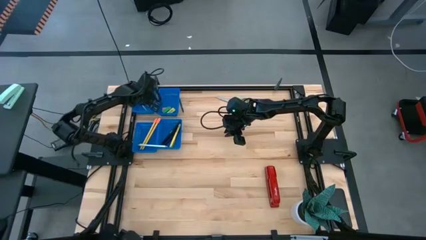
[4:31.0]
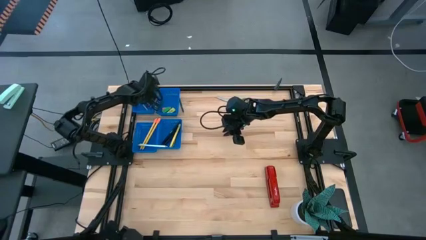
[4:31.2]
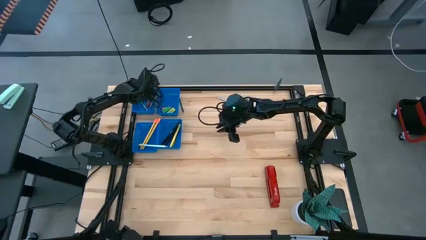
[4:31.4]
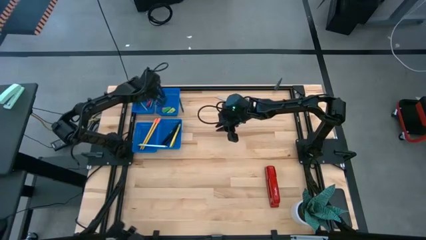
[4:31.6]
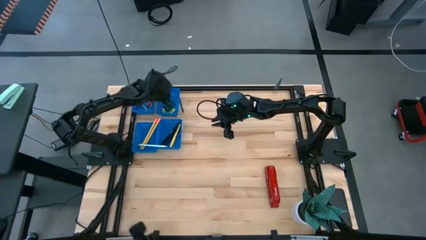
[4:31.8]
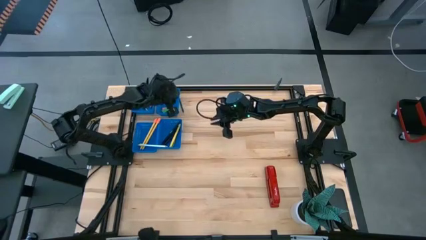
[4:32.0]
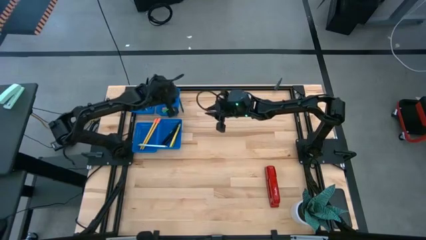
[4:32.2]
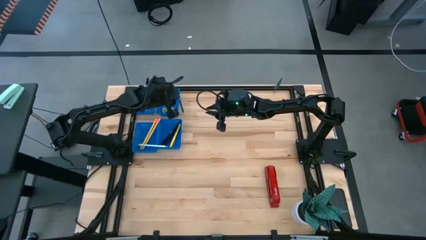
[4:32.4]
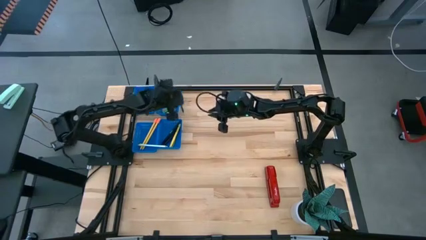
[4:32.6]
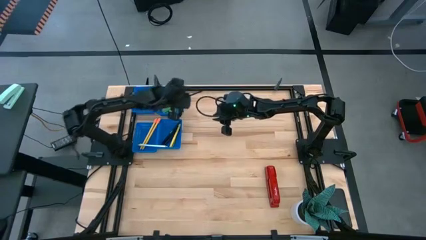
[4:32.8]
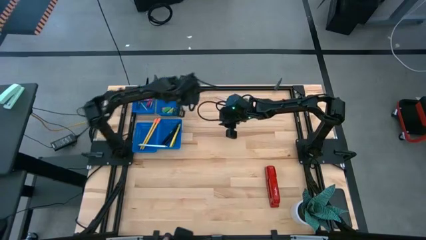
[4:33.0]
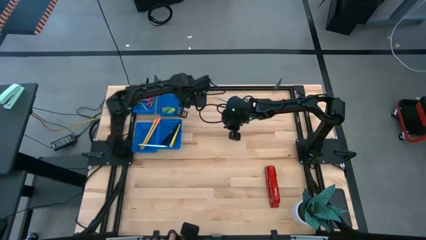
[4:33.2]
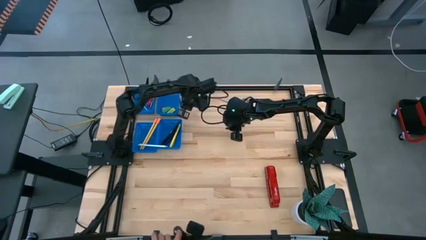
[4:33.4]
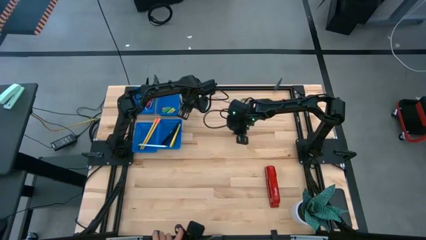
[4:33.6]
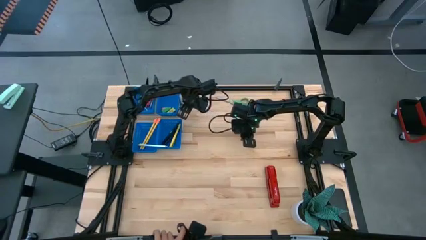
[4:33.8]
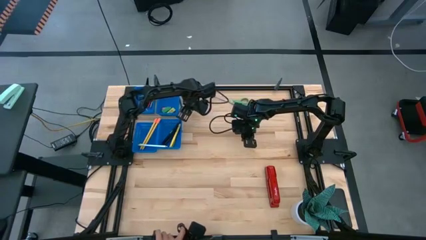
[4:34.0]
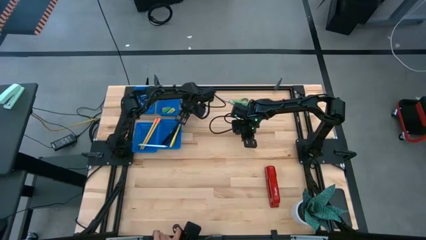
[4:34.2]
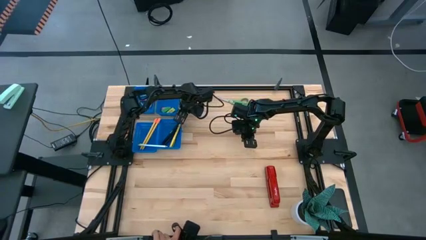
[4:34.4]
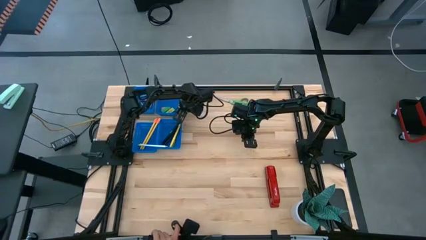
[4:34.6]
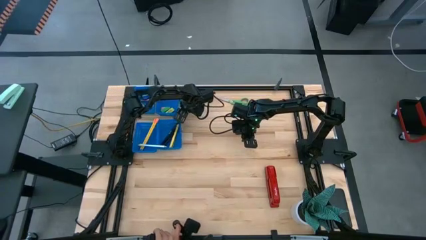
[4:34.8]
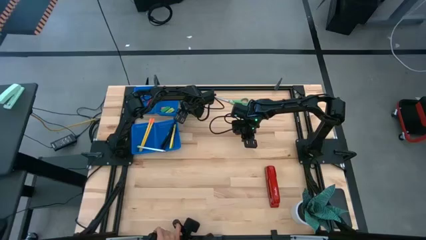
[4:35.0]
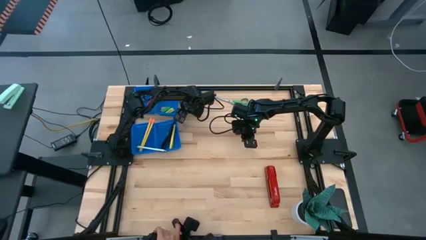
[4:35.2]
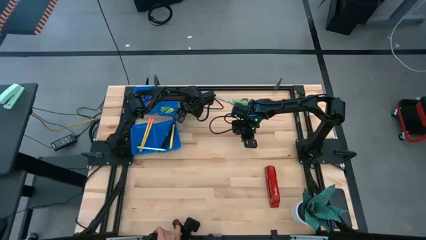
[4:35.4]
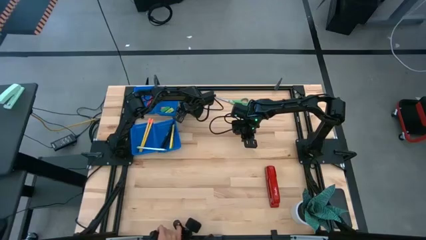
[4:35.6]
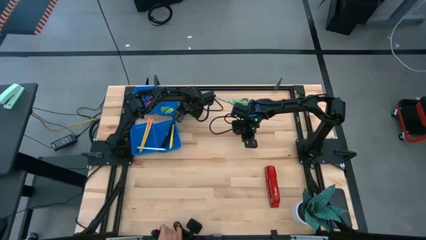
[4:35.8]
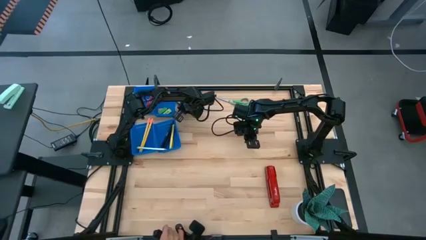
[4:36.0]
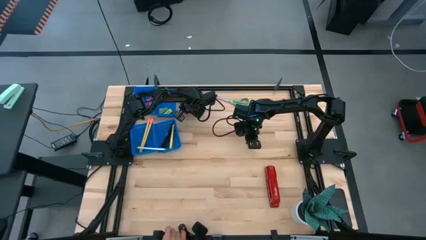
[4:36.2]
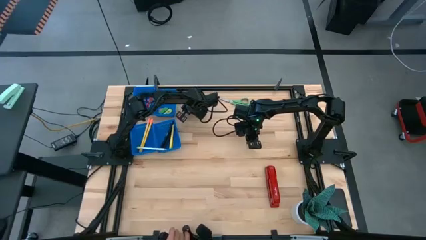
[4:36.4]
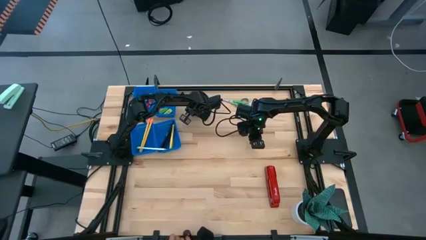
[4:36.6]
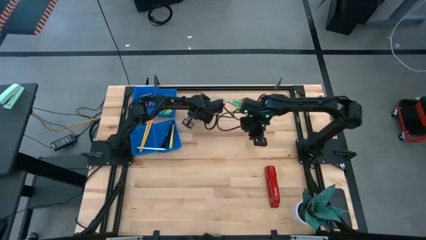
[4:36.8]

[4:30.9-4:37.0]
Task: Sort crayons/erasers/pens/pencils in bins
Put the green crayon into the top left blue bin

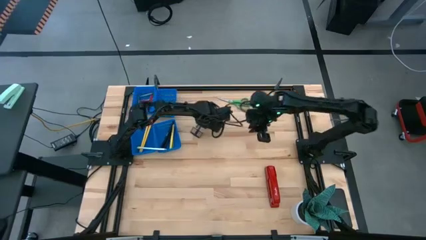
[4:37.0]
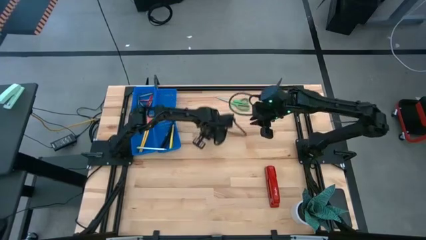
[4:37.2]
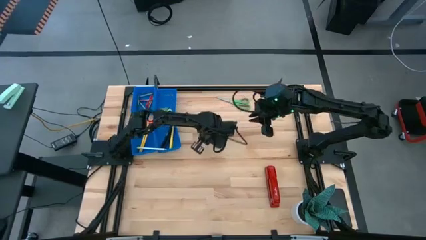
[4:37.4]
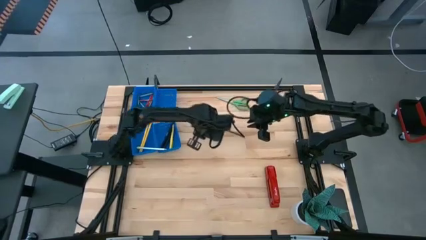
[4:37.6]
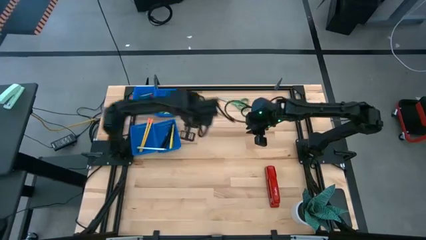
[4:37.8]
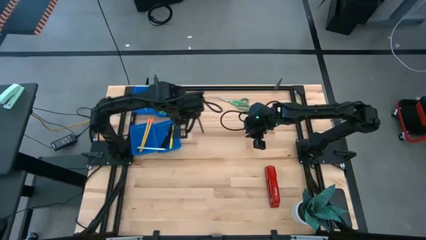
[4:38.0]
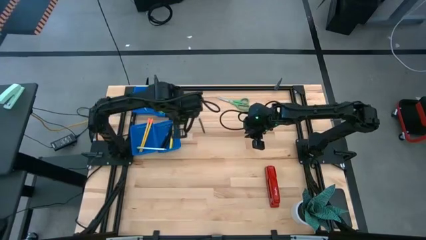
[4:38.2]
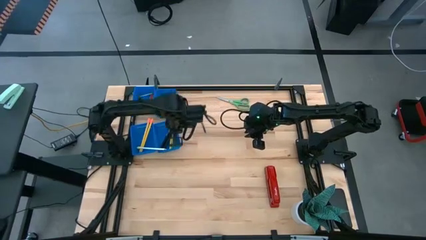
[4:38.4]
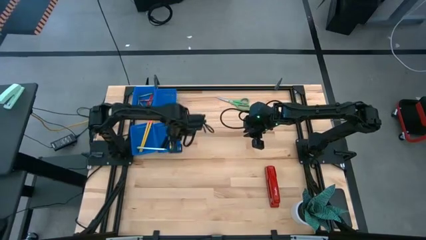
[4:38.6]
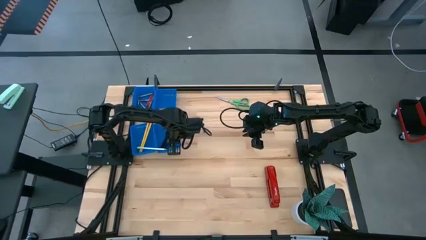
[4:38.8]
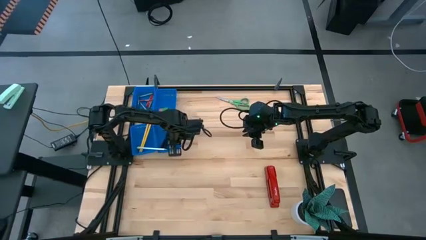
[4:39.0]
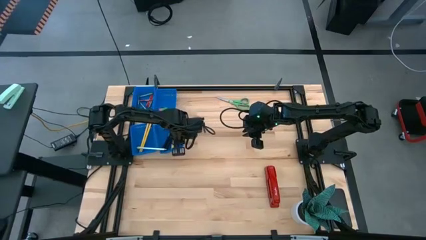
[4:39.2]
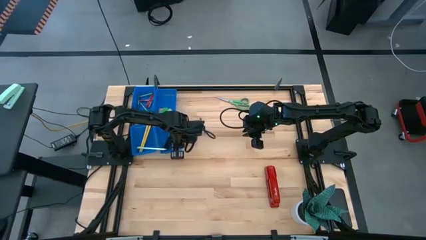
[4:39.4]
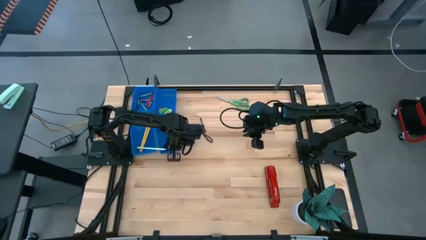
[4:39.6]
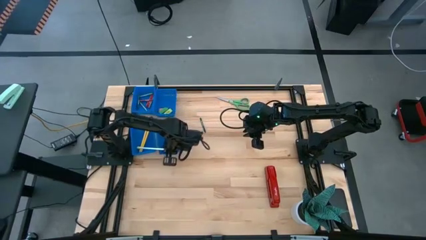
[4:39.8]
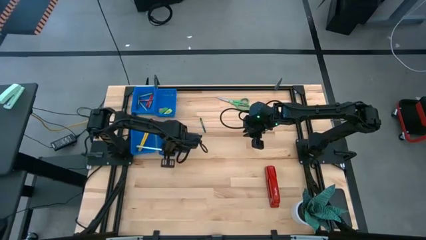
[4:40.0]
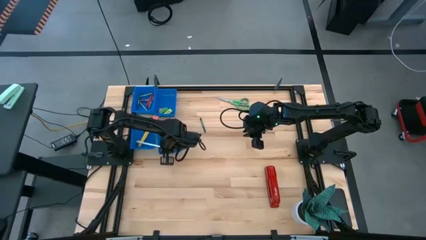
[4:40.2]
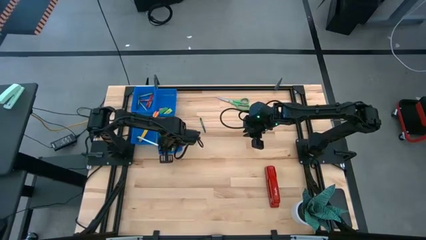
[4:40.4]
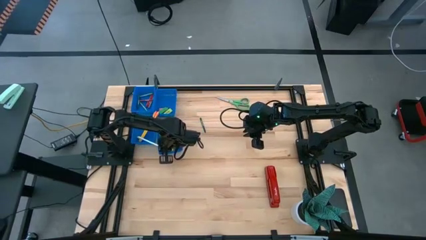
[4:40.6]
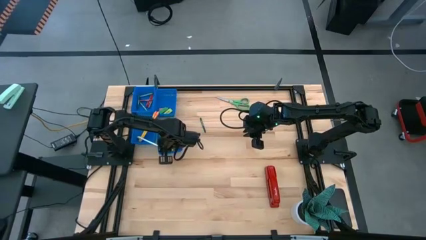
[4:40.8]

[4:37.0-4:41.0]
Adjust the bottom left blue bin

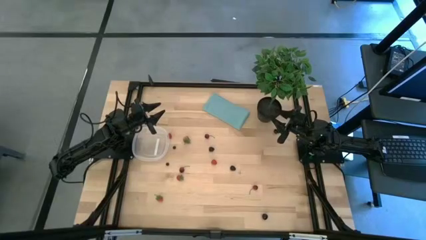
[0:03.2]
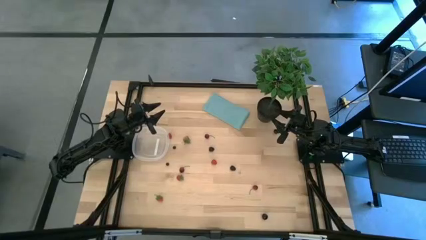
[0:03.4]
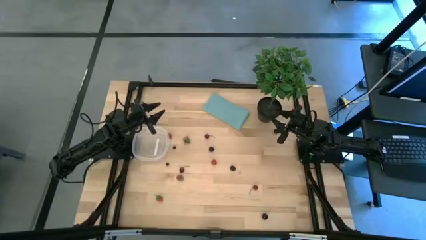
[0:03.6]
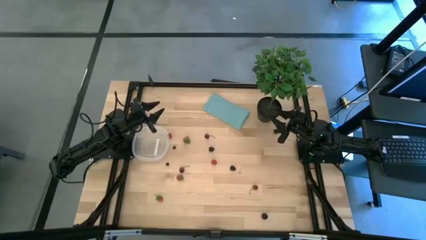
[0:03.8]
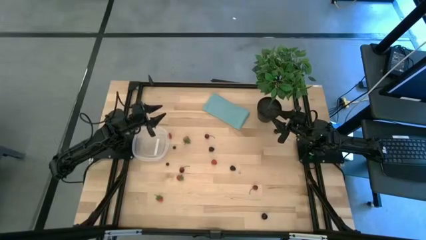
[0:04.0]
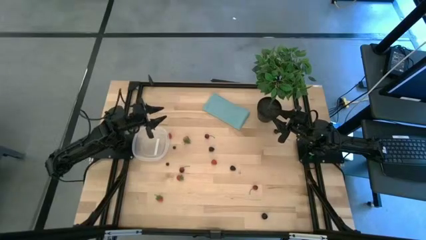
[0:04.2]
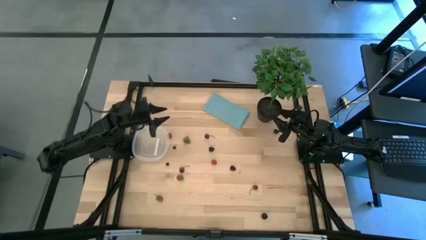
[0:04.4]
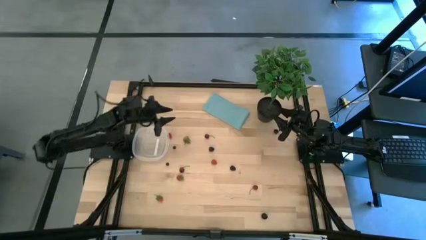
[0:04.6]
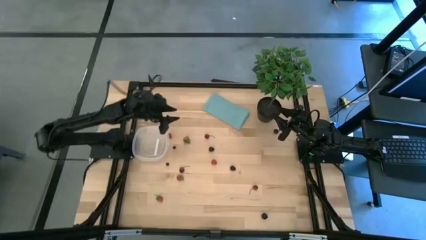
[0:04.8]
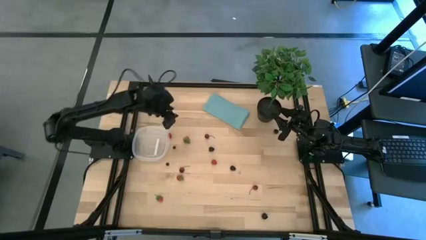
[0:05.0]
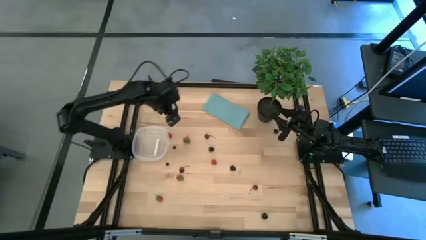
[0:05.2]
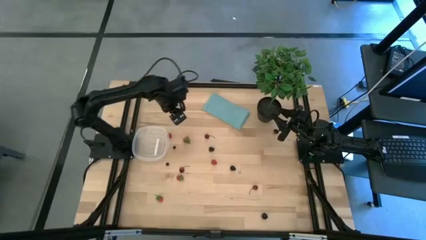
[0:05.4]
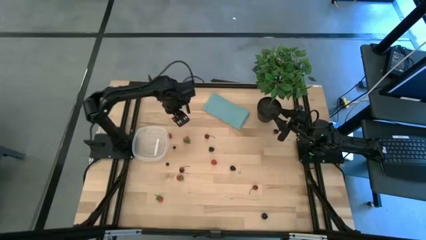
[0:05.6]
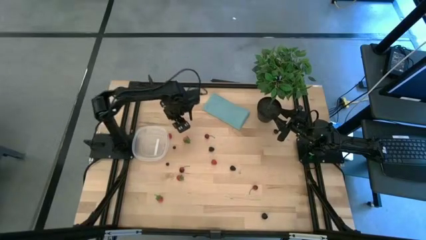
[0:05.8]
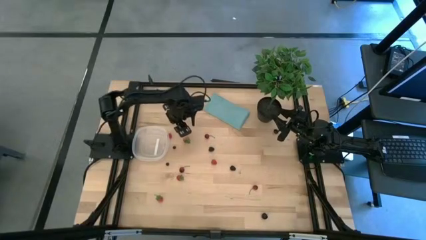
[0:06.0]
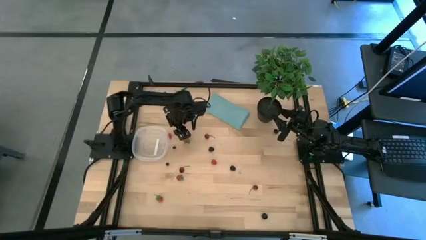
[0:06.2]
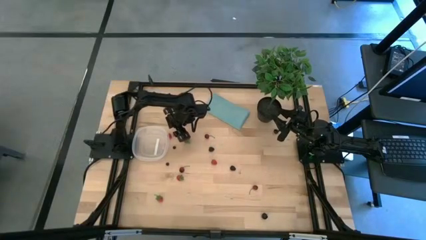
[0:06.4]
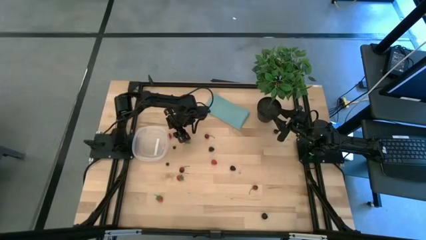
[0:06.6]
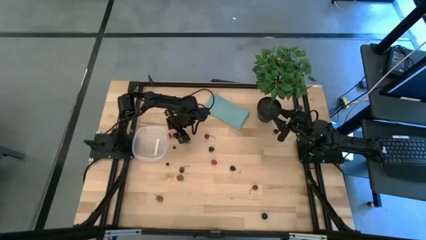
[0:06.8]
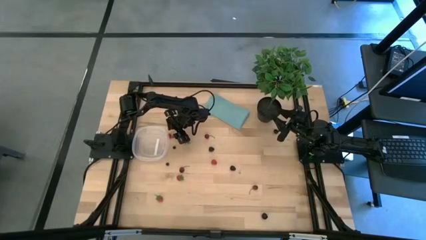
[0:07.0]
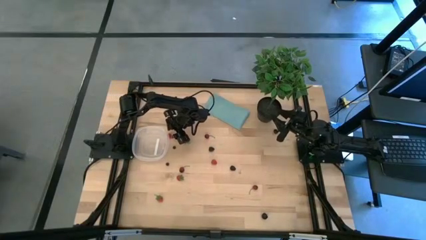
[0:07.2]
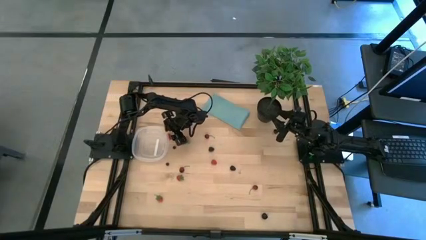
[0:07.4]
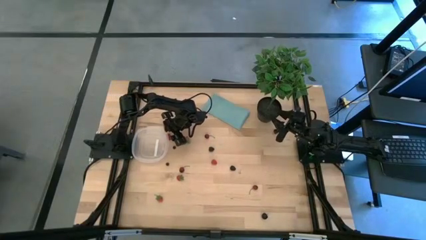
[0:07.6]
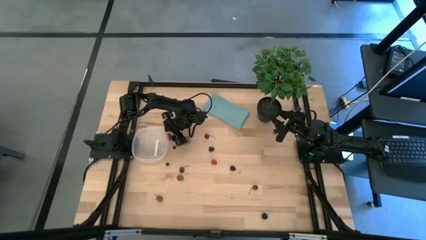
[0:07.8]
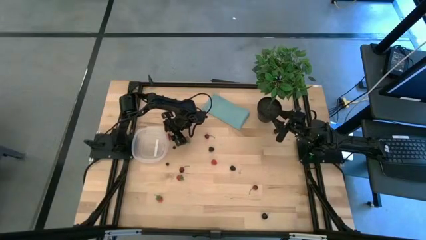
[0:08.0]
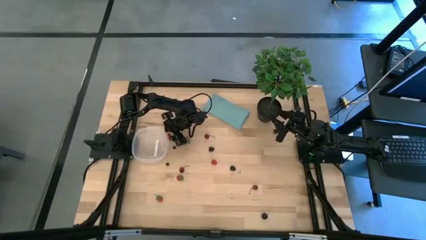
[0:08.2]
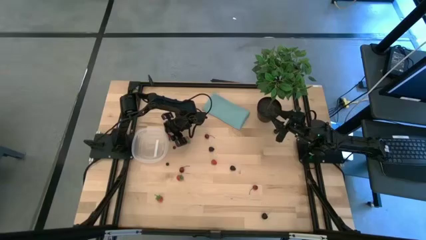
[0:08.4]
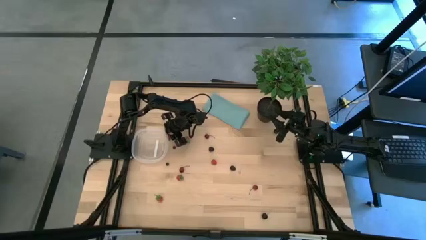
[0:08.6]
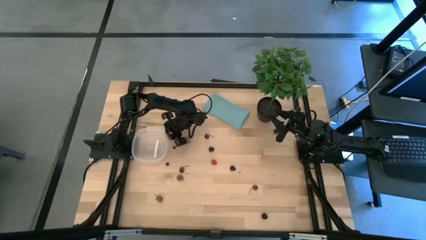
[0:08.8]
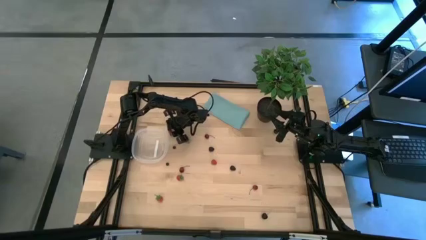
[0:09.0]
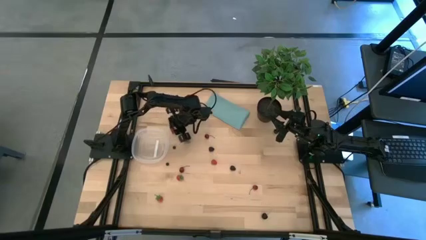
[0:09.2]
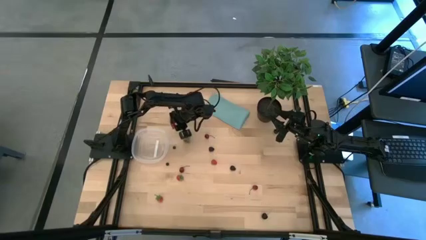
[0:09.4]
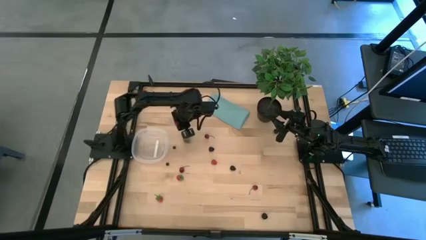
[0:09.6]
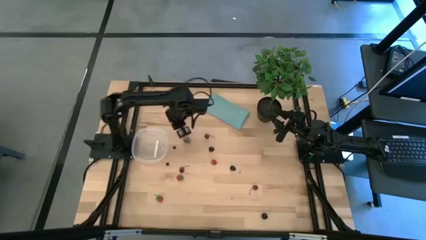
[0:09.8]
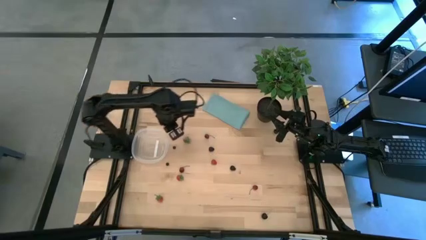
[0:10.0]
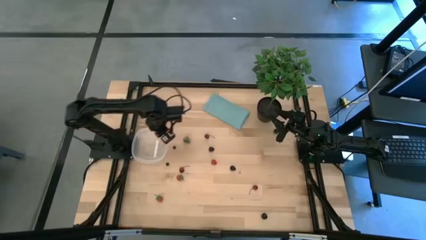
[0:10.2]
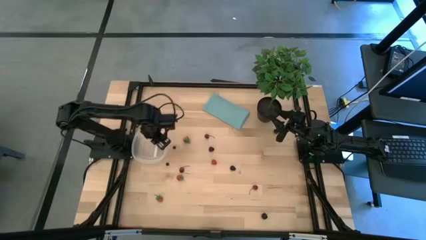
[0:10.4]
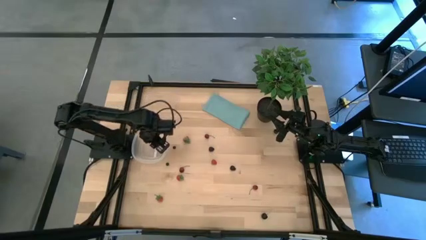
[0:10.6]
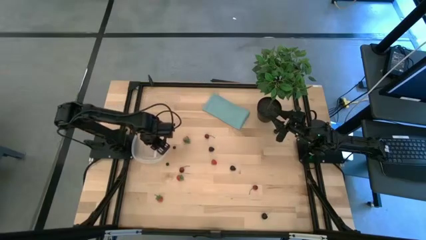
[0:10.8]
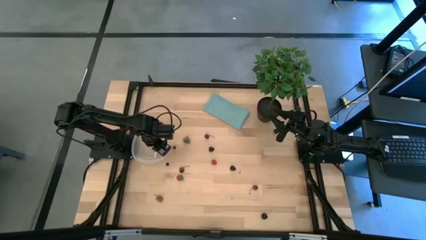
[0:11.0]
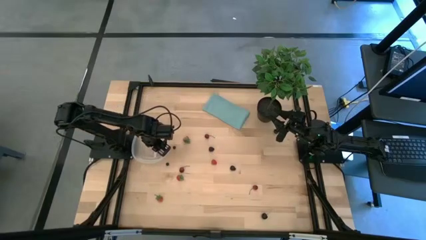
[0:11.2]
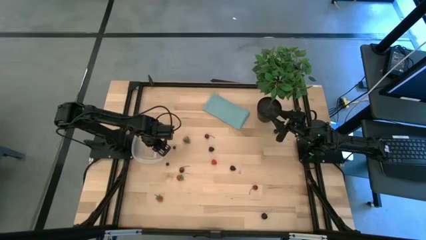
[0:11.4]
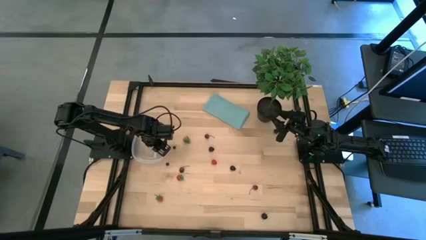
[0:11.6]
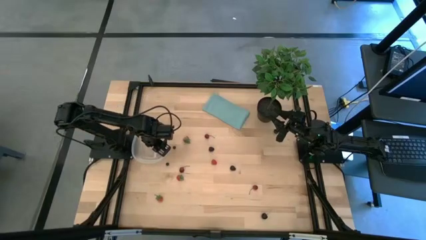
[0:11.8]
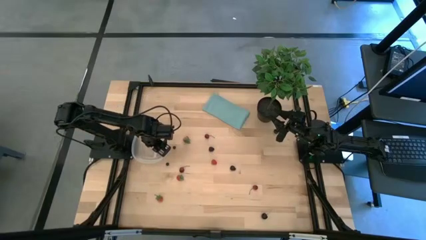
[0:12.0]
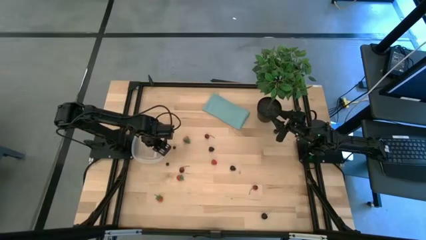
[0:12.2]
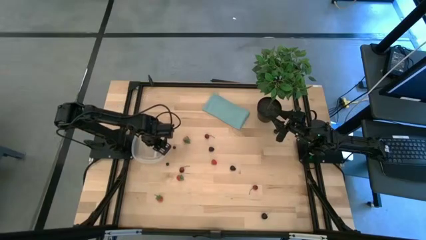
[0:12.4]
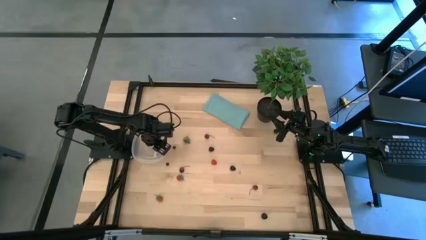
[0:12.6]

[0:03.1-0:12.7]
Task: Pick and placing Produce into tupperware
Put the top red raspberry into the transparent bin
